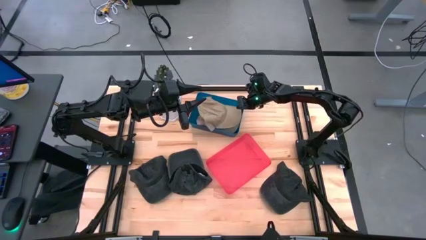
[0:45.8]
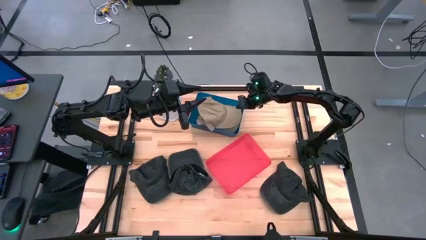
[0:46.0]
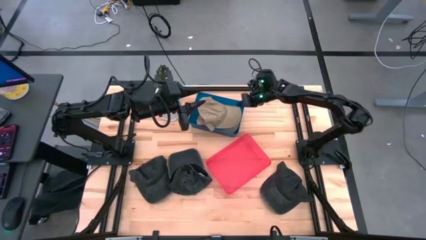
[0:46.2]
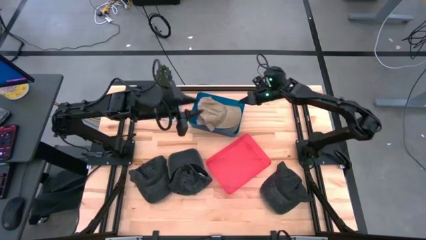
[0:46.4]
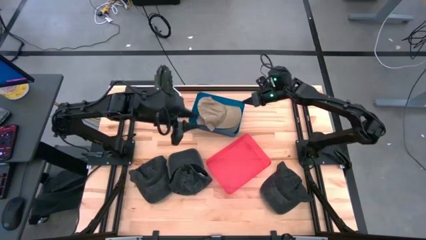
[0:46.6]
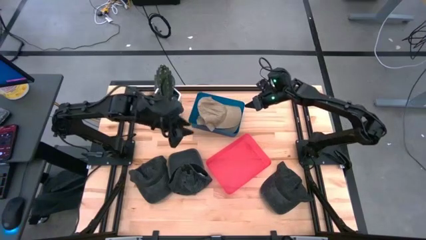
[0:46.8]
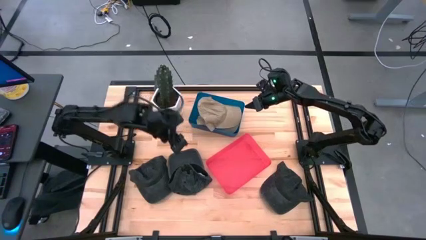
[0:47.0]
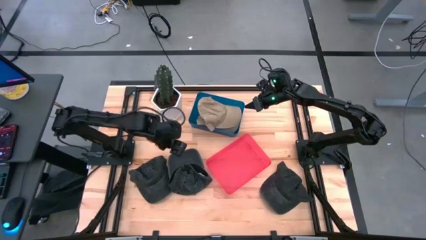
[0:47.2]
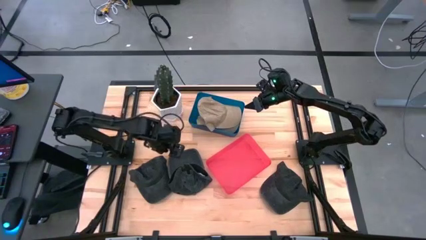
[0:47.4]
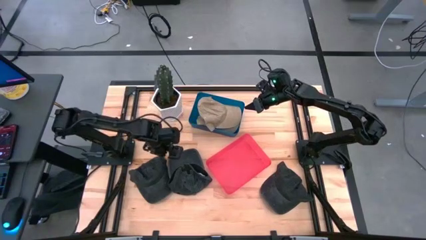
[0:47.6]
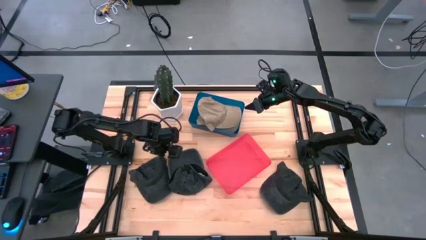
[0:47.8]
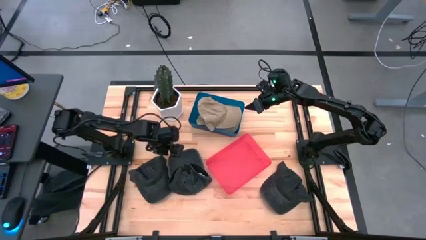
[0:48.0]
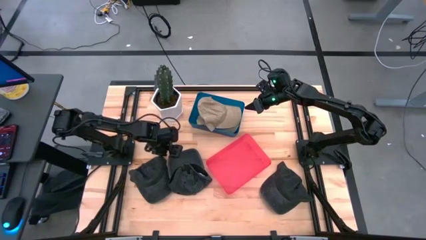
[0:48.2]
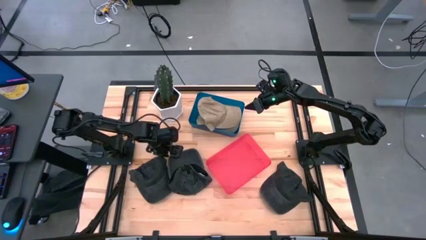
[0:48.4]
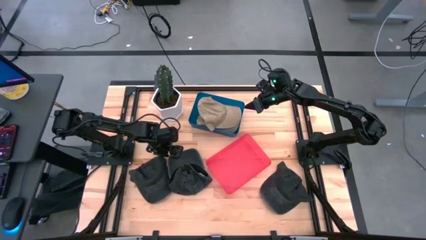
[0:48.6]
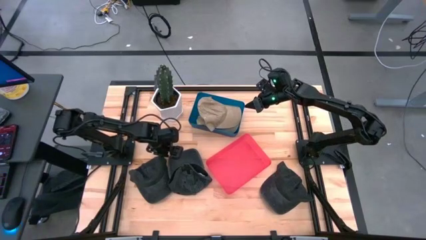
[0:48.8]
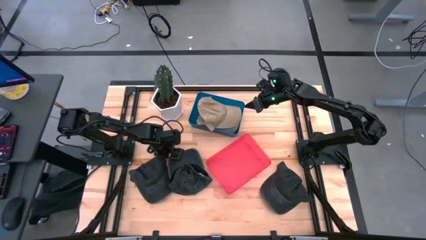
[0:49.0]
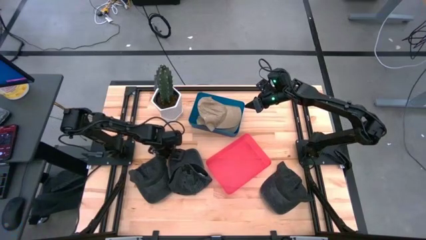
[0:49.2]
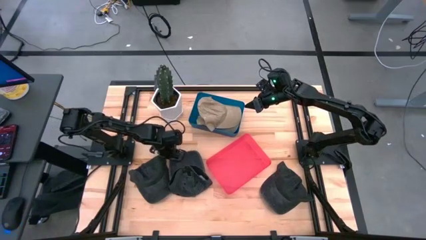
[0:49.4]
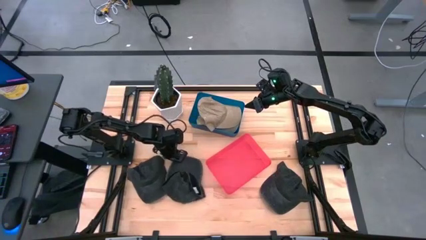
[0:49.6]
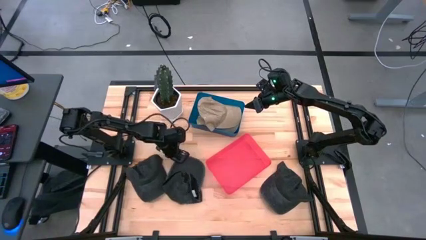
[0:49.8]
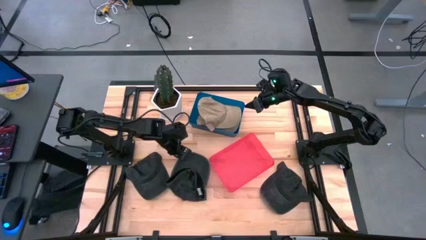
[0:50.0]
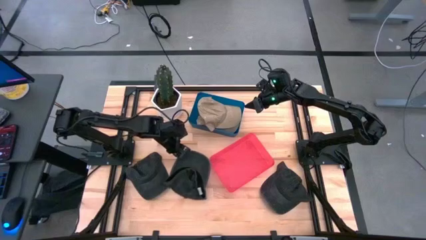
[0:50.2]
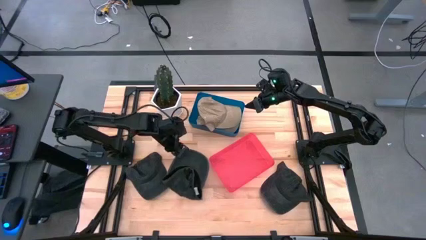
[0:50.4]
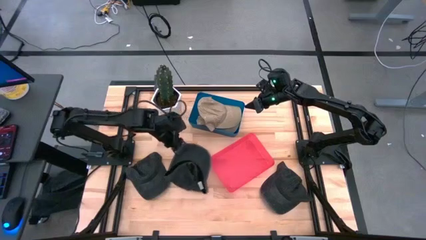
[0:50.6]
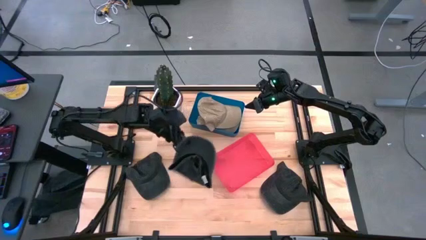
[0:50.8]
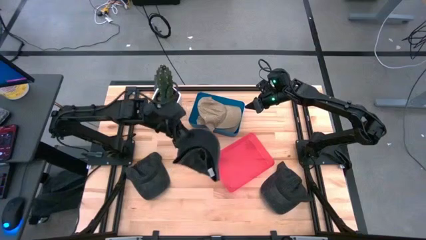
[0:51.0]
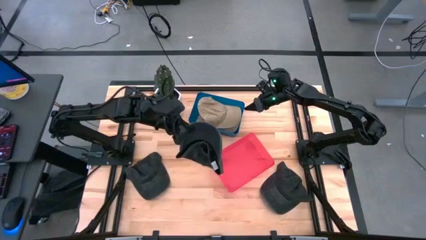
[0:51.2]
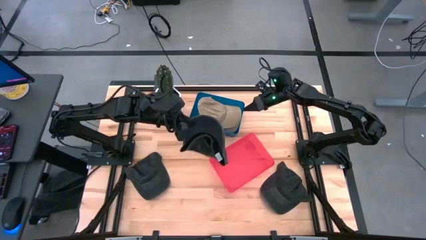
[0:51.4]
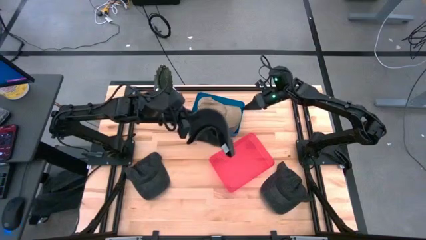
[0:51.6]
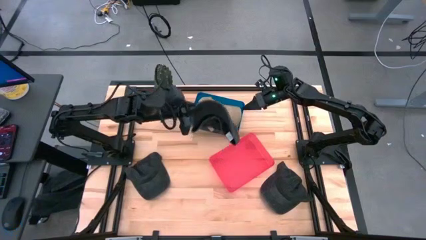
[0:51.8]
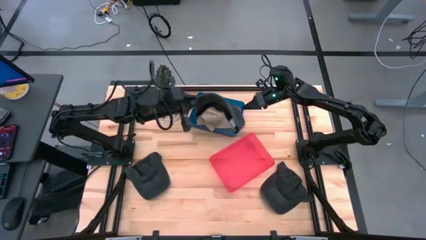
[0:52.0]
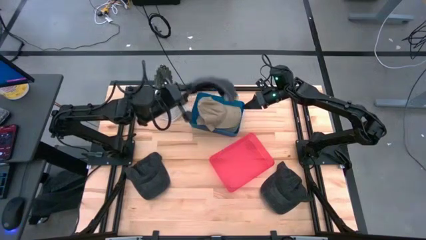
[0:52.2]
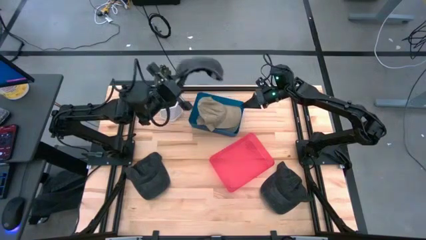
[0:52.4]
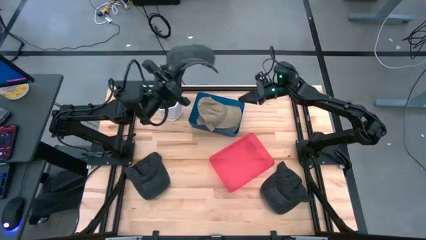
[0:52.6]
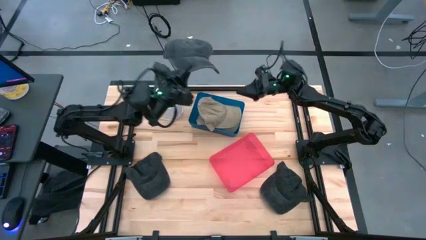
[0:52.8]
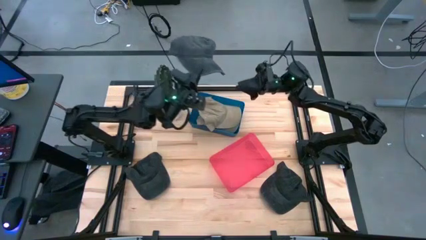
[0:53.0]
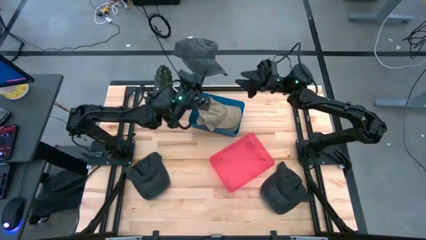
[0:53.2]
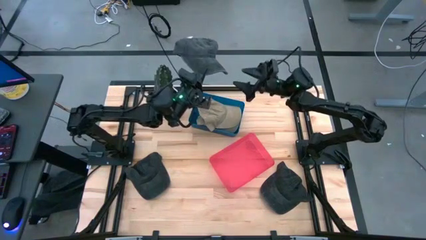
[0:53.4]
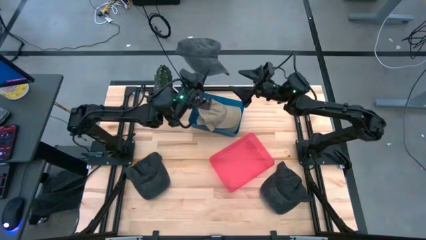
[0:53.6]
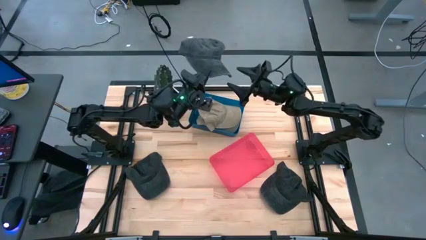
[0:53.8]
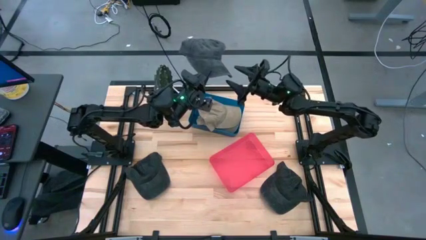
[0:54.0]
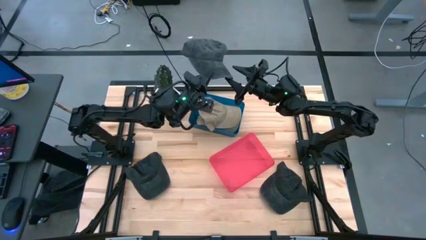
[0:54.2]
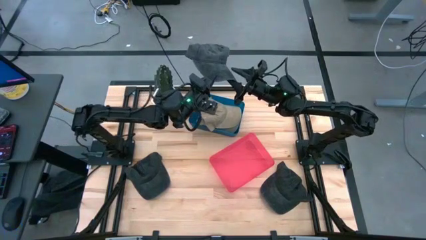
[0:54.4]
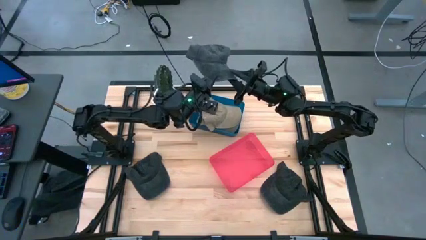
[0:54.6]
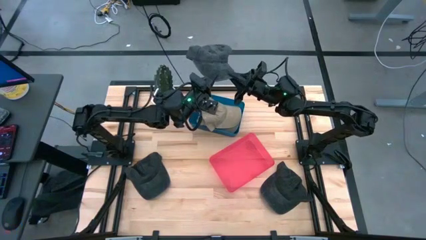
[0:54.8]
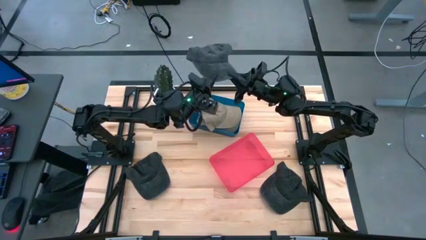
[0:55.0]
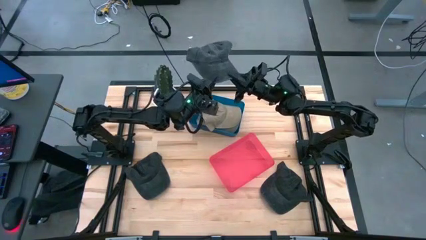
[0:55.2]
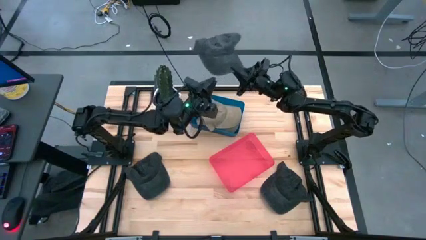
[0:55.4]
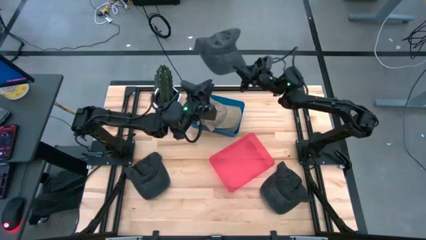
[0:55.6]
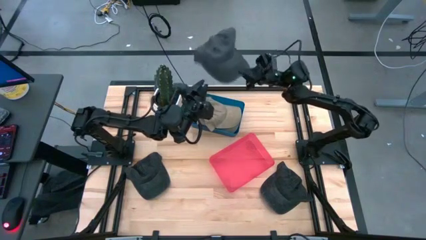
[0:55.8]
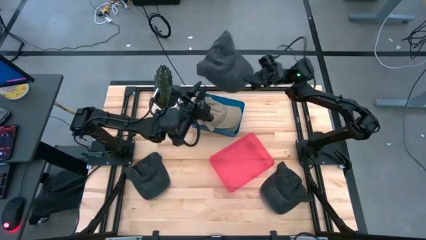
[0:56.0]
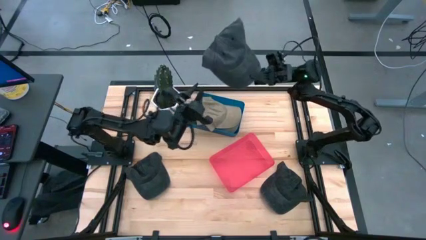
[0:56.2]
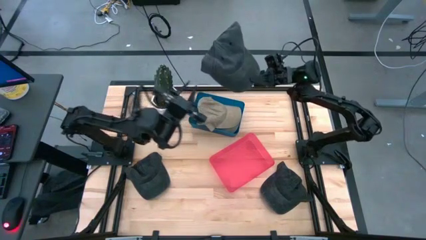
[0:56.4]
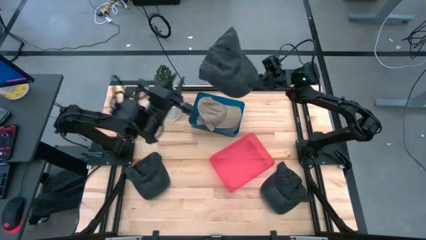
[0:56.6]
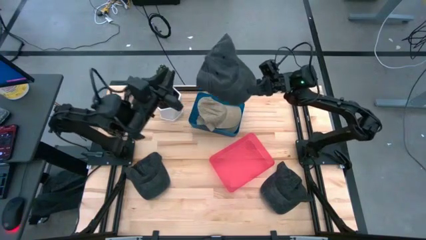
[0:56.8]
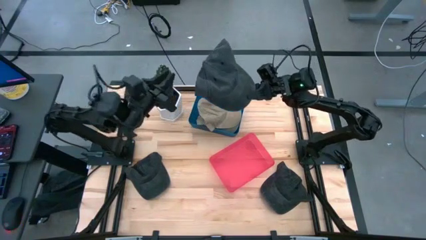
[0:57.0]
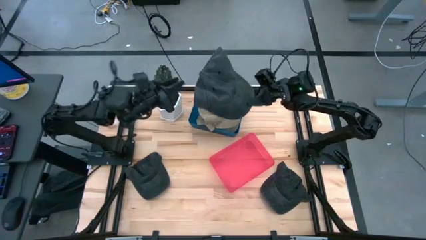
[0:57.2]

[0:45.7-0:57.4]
Task: Pick & Place hat
Put the middle black cap into the red bin

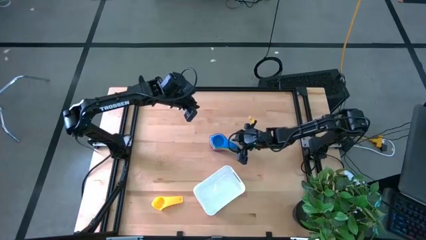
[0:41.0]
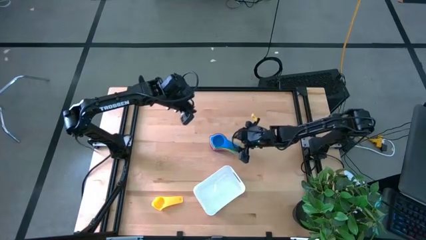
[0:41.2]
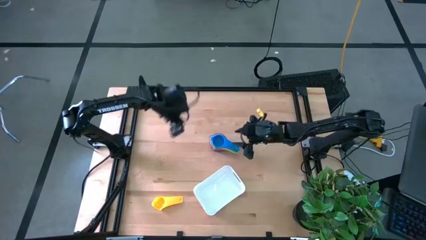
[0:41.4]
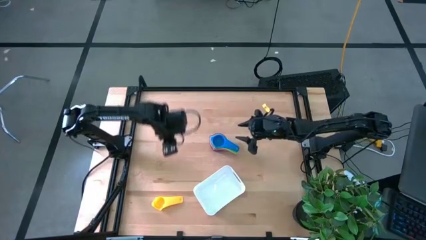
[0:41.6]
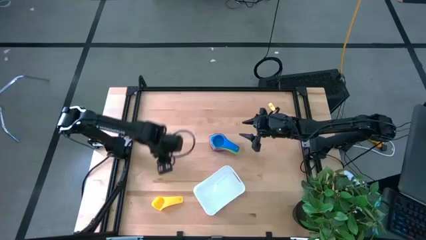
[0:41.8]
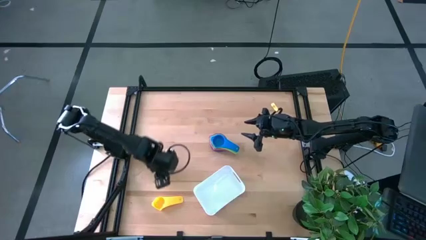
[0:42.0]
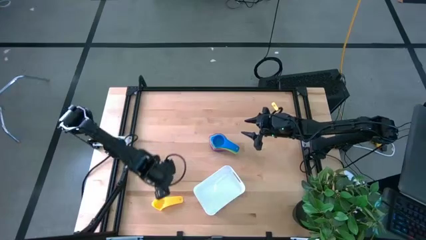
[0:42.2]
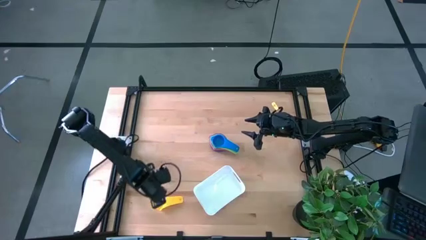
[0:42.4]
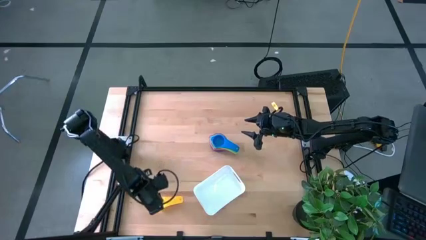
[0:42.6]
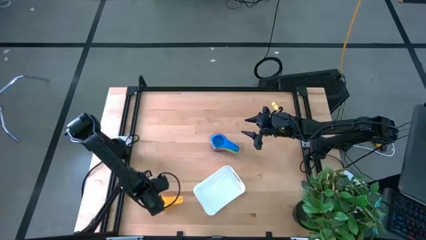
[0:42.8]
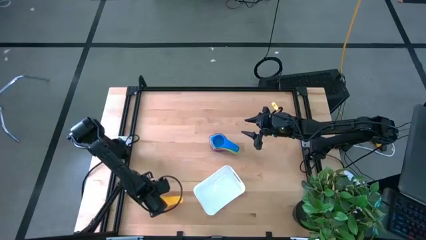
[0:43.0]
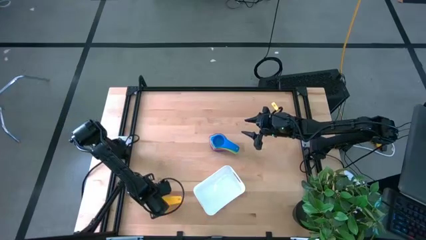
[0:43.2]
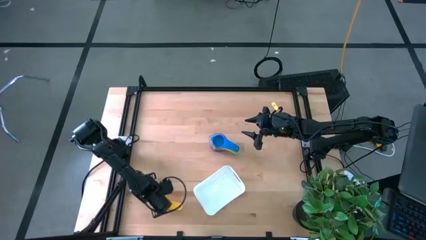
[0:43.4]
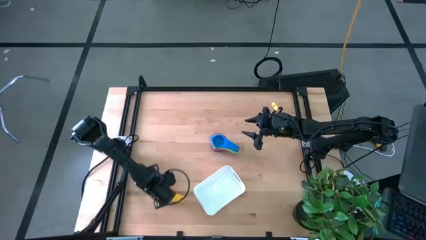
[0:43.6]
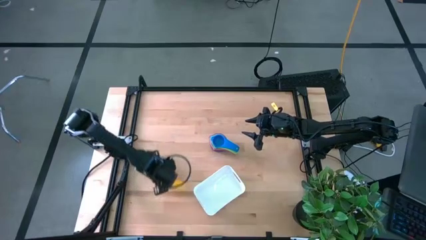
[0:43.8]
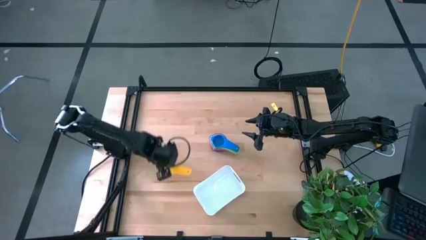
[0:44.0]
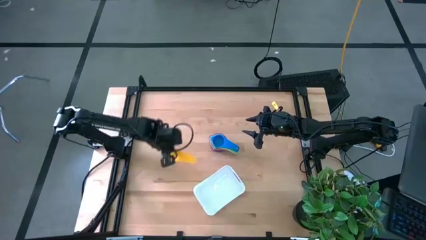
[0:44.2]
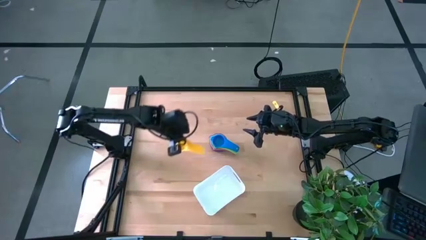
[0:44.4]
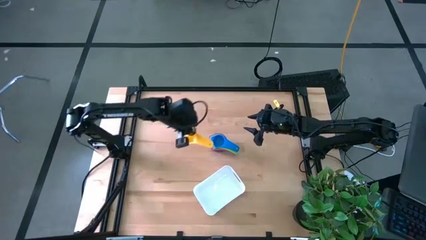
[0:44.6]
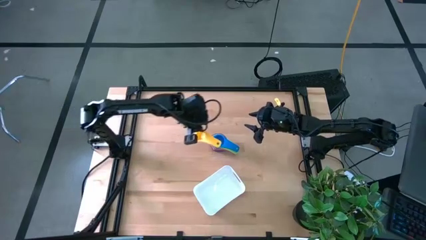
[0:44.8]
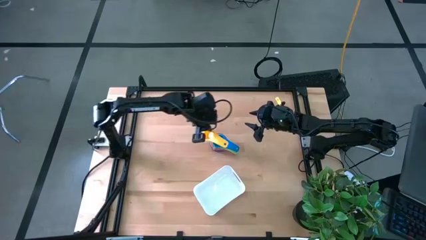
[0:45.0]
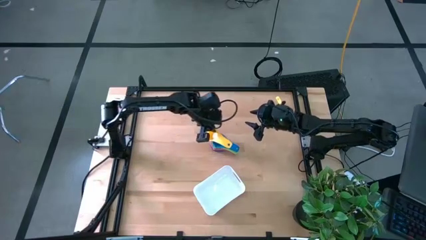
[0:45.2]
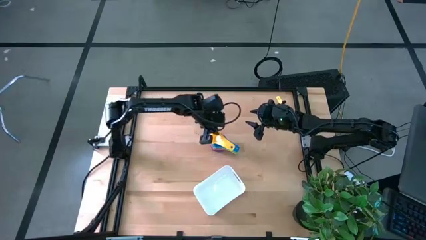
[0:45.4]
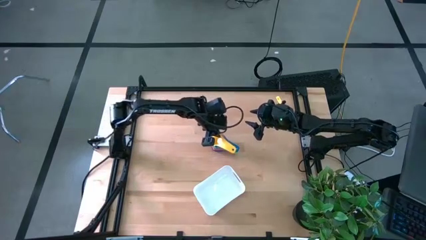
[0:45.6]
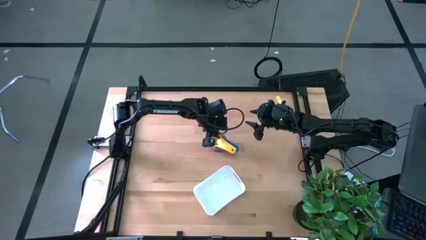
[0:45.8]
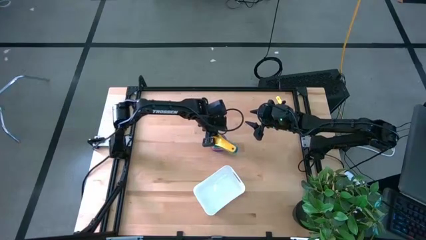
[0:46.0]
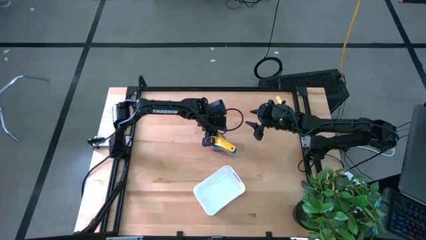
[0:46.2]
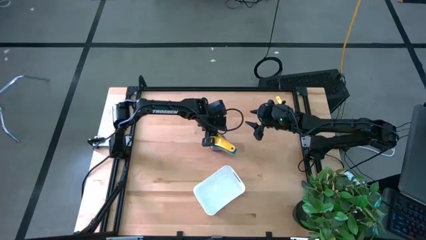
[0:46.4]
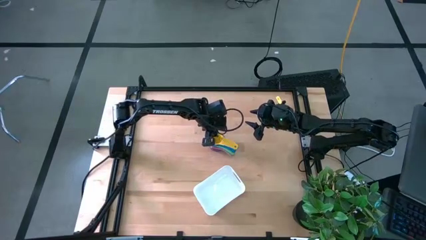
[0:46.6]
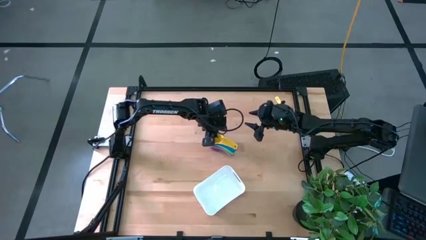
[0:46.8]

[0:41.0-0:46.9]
Task: Nest measuring cups in basket
Stack the yellow measuring cup on top of the blue measuring cup
